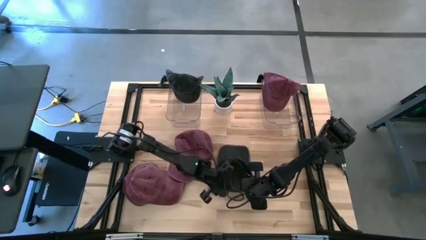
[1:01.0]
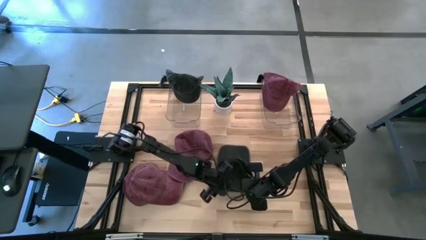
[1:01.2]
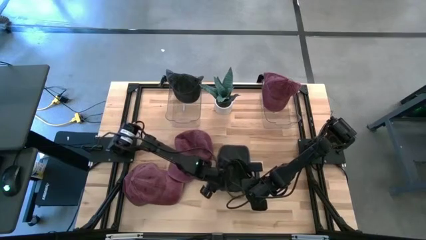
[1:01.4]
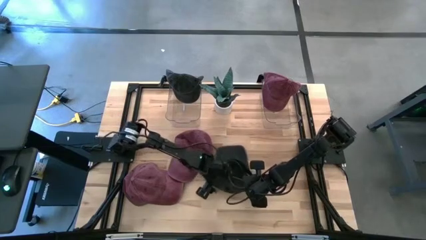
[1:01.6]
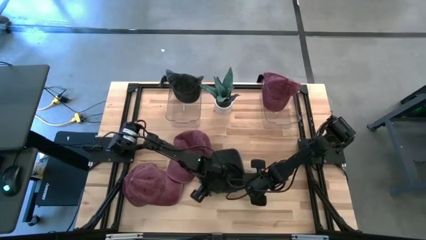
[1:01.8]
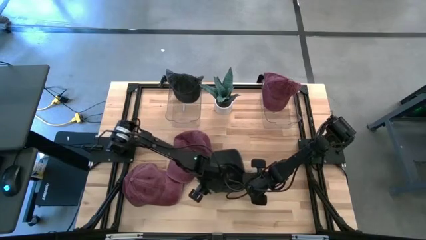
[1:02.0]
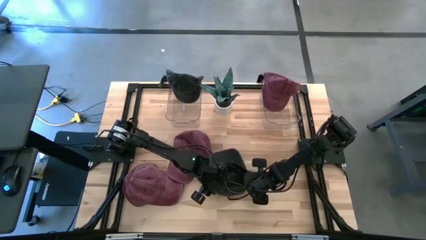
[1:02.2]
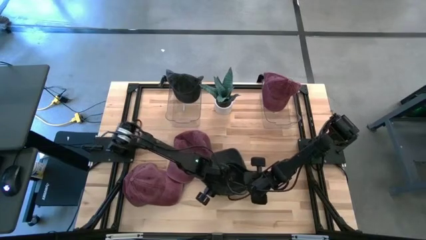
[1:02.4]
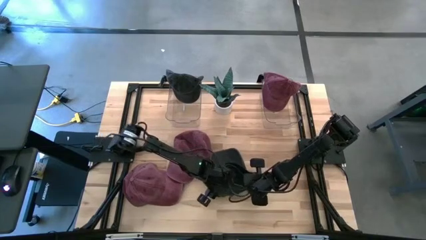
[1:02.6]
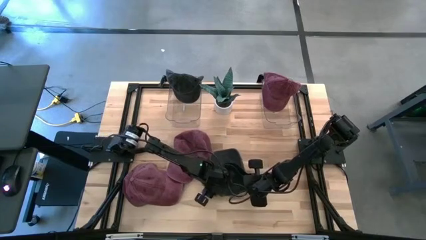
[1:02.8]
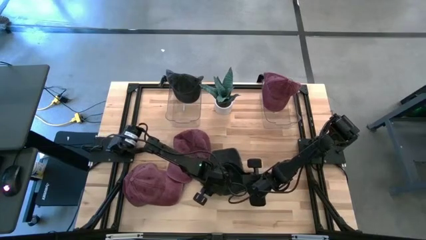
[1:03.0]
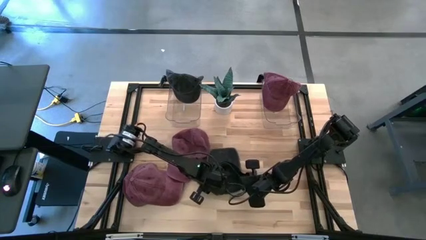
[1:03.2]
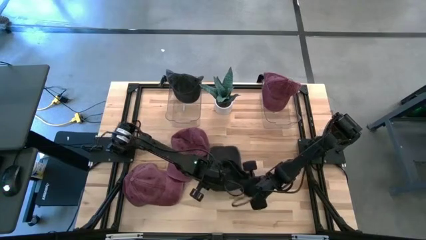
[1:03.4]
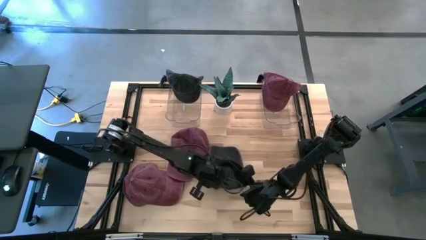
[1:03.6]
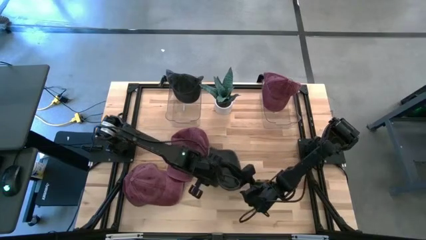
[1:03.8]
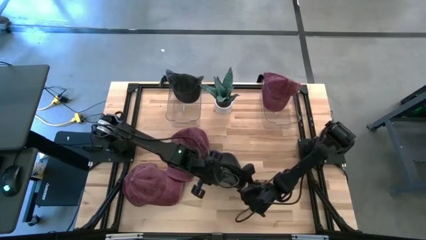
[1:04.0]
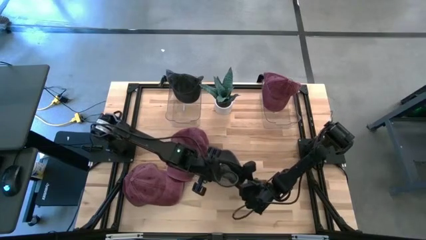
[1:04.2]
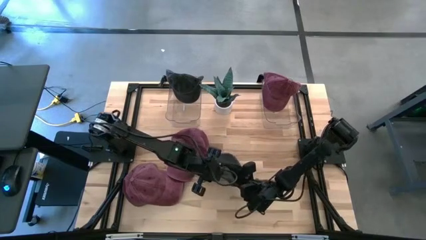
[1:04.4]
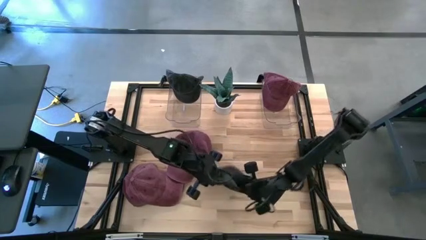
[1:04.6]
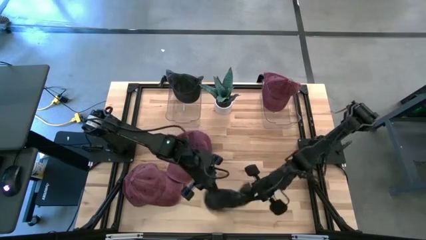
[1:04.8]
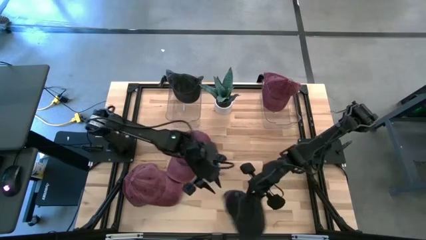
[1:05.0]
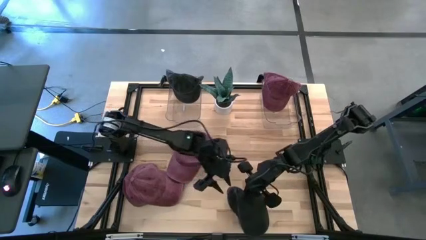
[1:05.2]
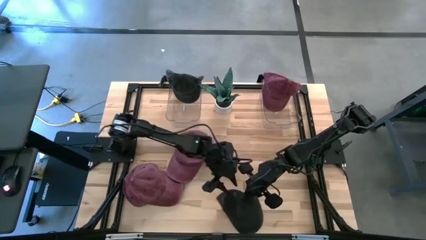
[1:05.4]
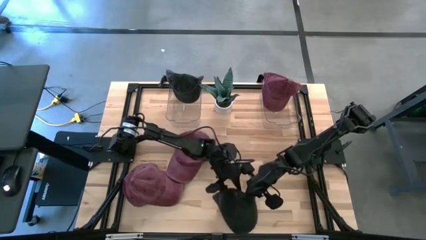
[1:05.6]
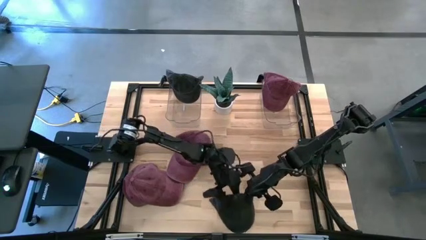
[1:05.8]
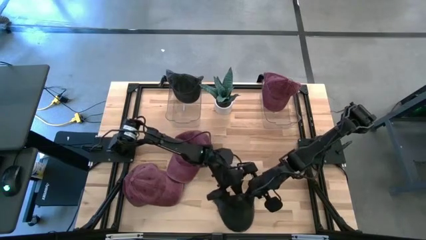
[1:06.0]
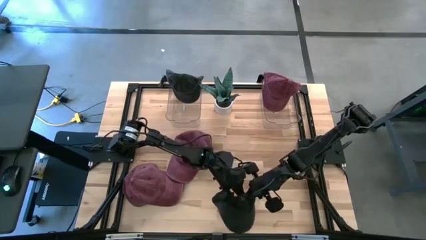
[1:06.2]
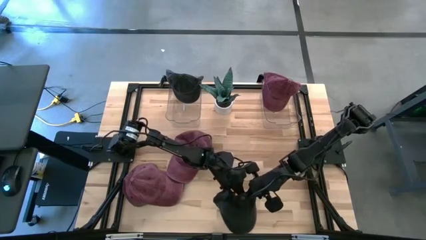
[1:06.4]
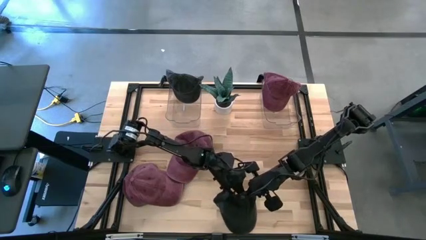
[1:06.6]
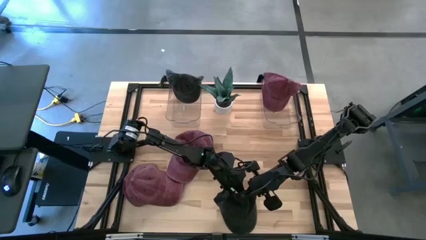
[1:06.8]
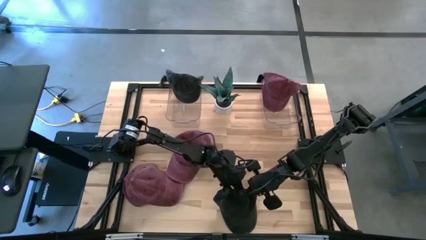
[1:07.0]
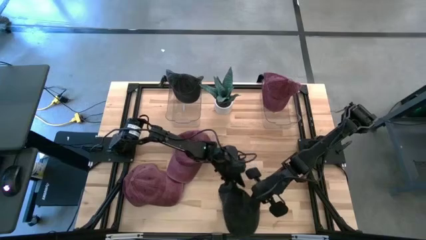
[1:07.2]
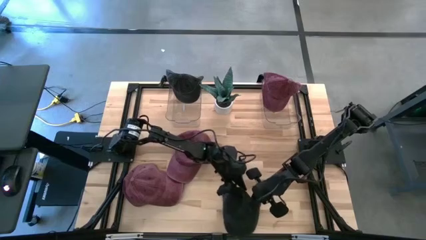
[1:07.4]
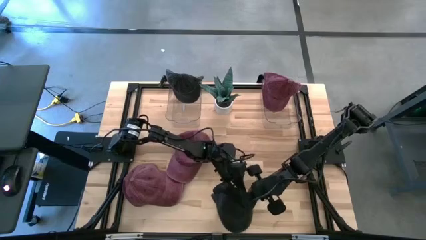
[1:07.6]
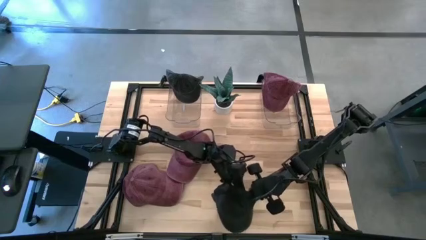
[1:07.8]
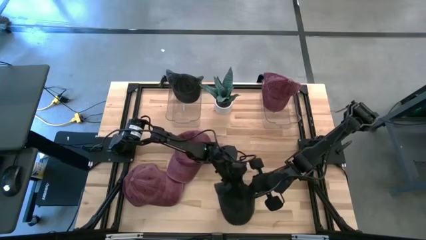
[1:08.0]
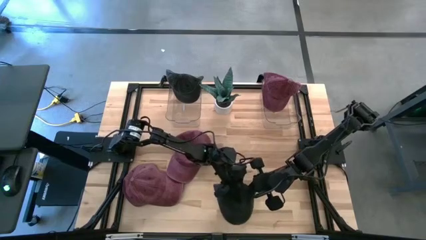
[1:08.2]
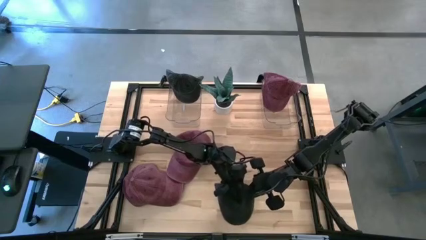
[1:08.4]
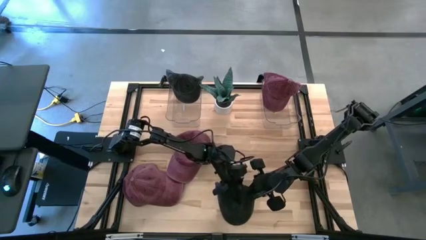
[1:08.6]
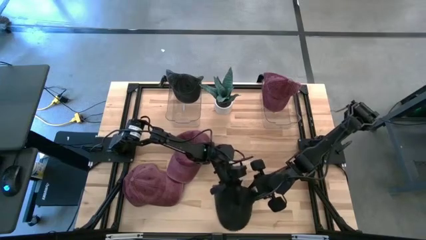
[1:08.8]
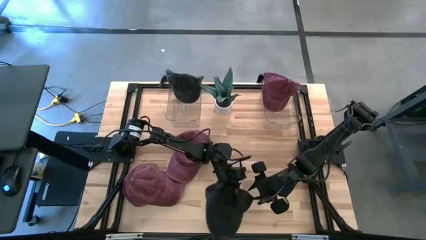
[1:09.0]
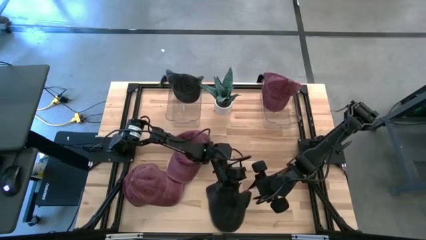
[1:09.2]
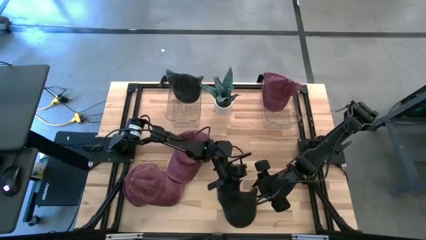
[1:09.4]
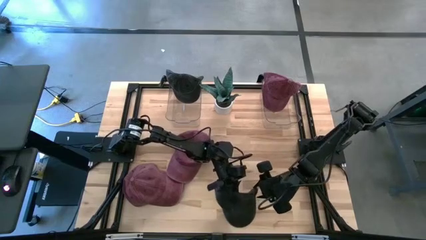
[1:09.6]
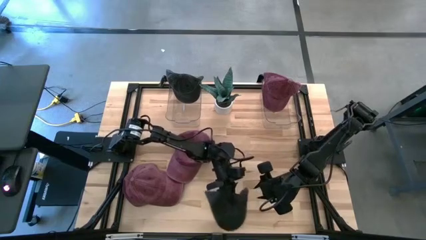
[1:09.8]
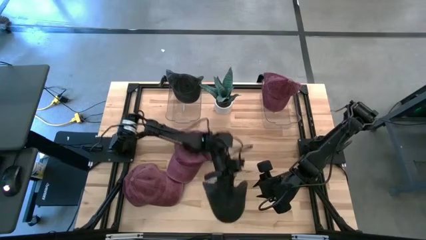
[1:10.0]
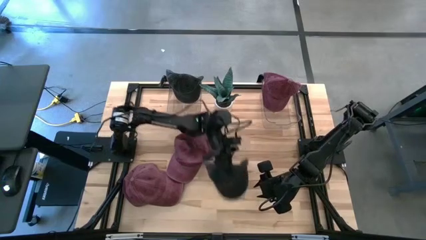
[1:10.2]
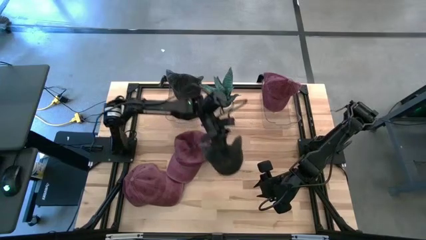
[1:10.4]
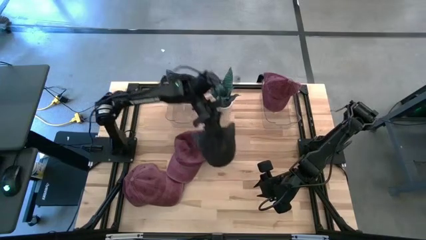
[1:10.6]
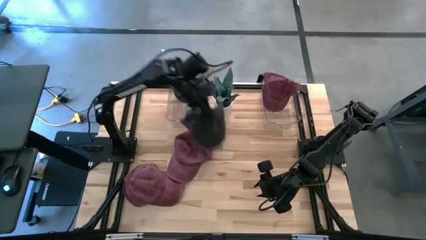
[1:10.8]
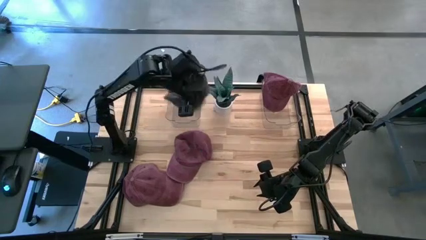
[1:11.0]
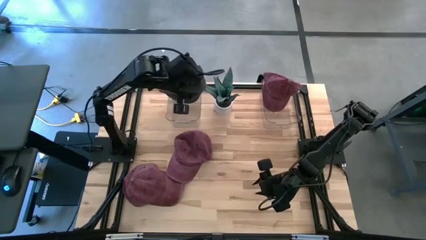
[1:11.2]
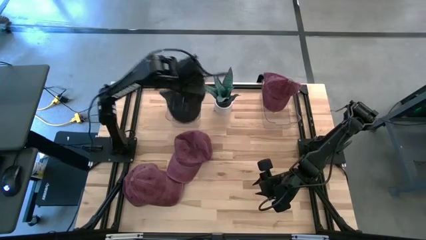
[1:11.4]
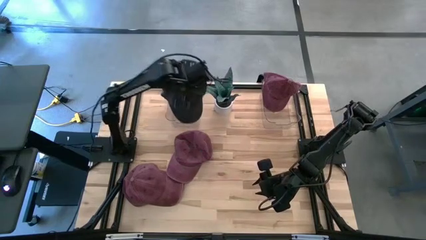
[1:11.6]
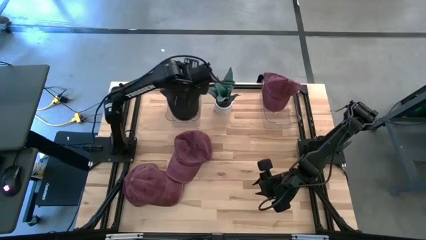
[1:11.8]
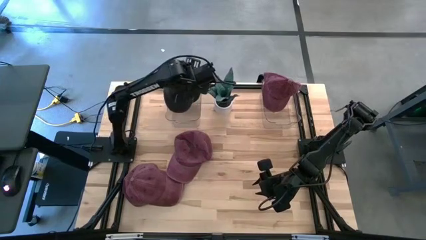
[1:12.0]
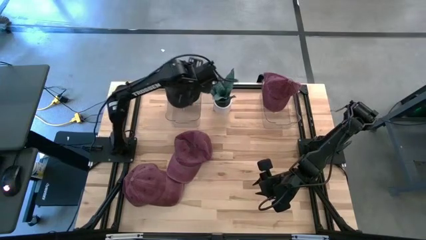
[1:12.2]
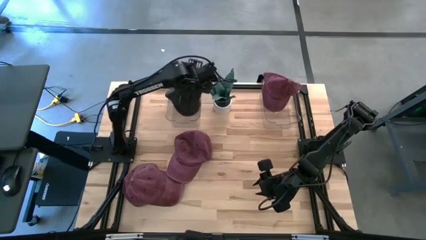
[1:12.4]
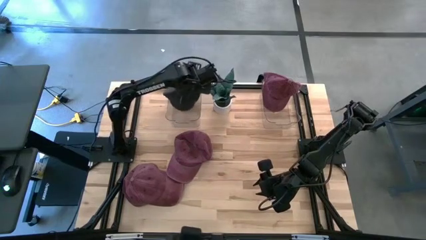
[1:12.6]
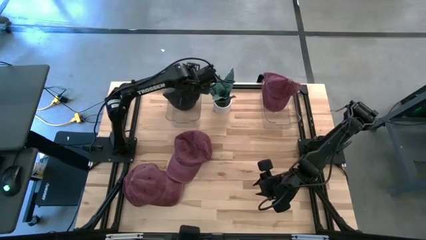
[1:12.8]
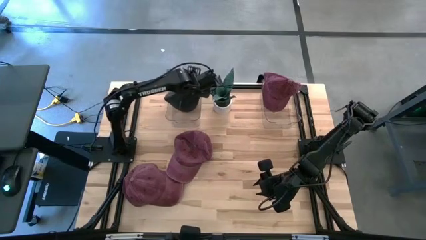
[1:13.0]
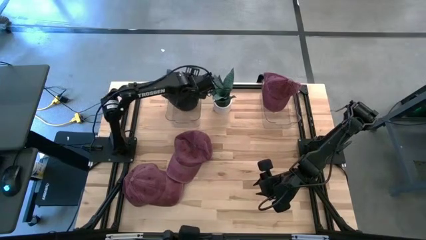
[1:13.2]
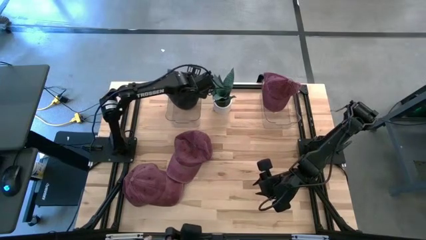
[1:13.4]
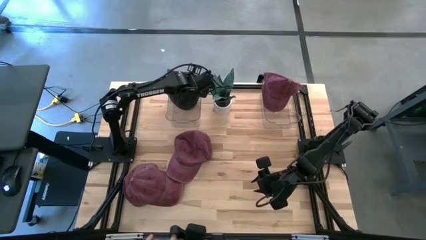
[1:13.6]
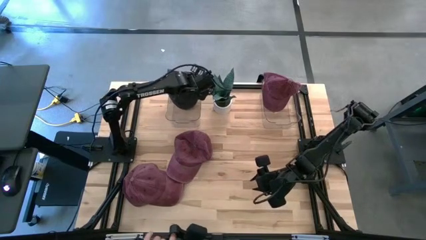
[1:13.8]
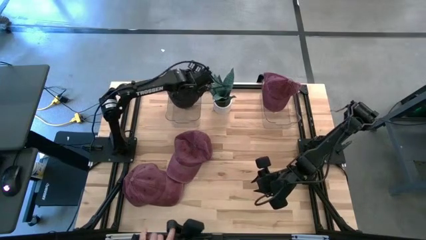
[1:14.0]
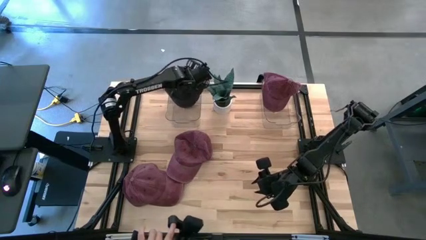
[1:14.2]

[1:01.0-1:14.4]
Task: Pick & Place hat
Put the black cap into the left transparent bin

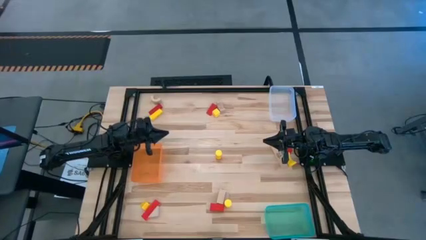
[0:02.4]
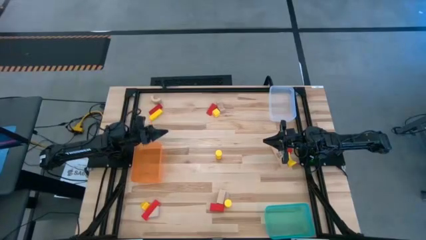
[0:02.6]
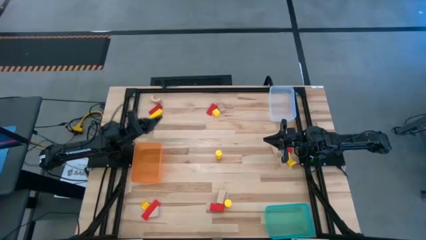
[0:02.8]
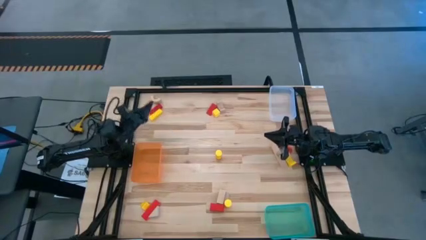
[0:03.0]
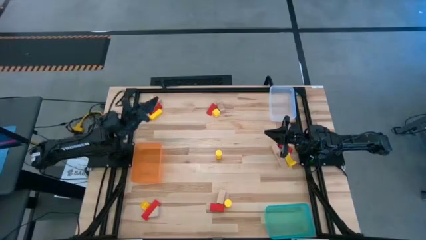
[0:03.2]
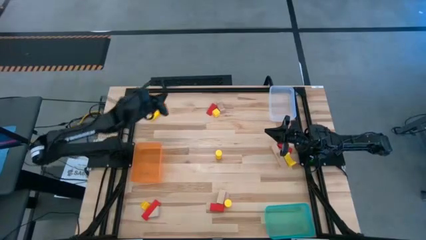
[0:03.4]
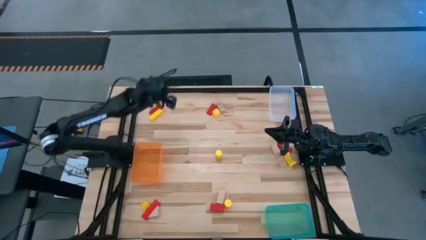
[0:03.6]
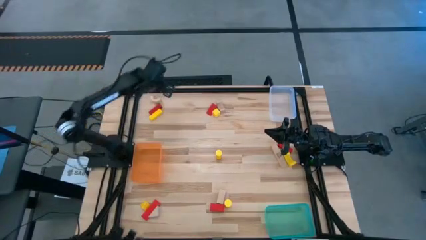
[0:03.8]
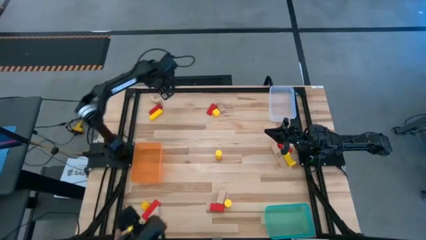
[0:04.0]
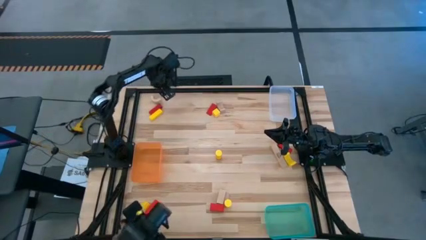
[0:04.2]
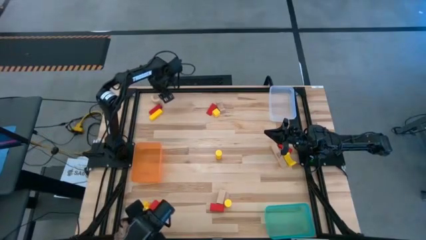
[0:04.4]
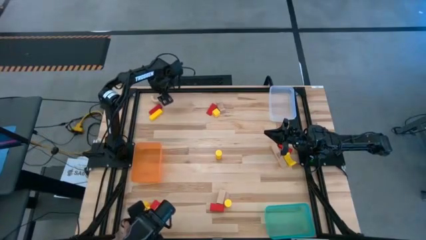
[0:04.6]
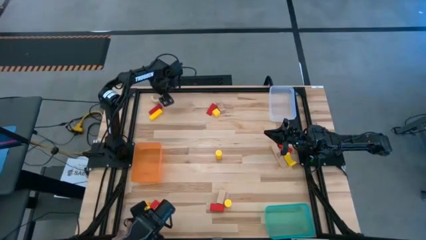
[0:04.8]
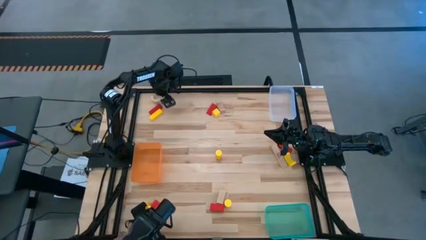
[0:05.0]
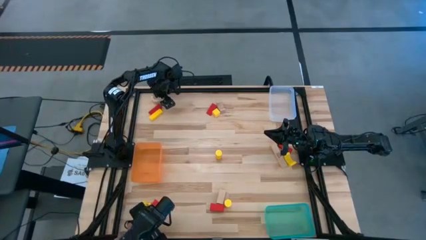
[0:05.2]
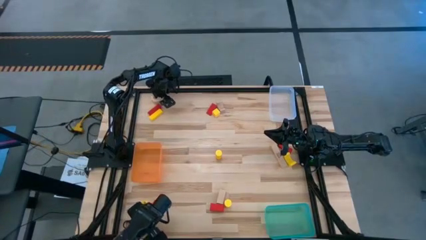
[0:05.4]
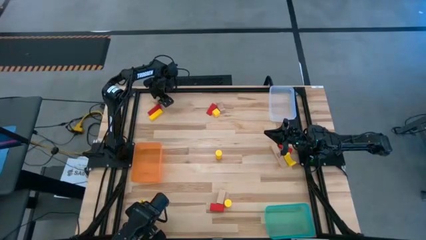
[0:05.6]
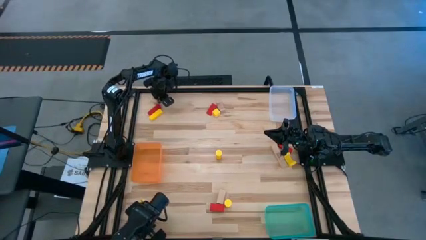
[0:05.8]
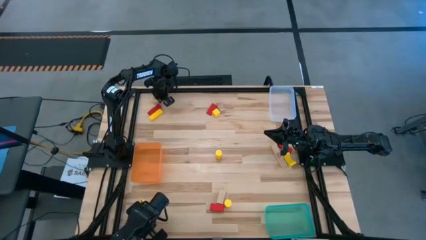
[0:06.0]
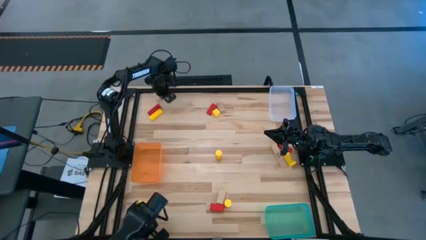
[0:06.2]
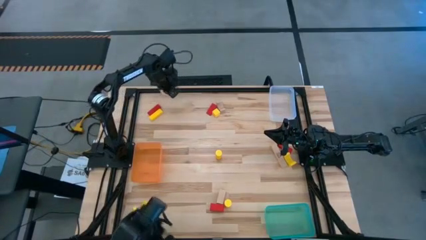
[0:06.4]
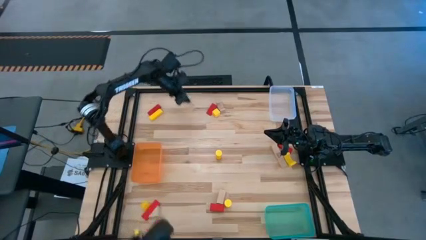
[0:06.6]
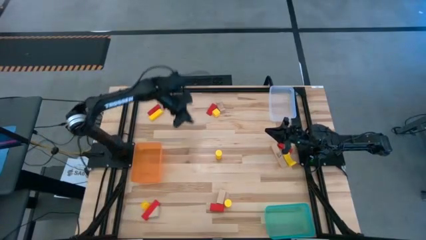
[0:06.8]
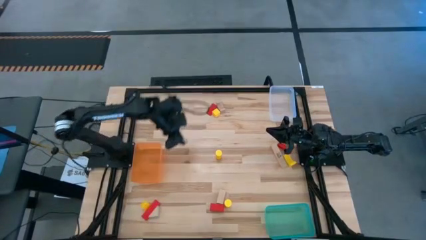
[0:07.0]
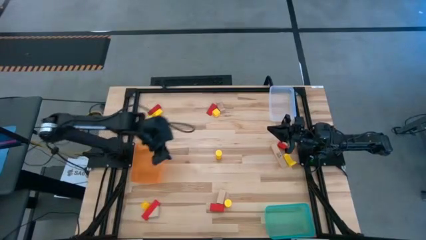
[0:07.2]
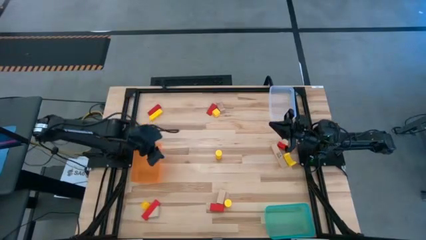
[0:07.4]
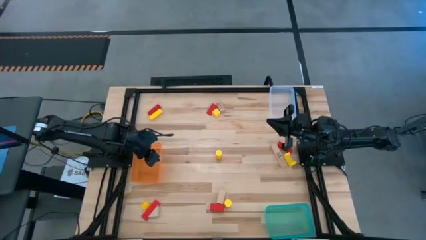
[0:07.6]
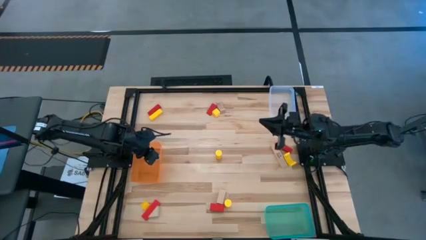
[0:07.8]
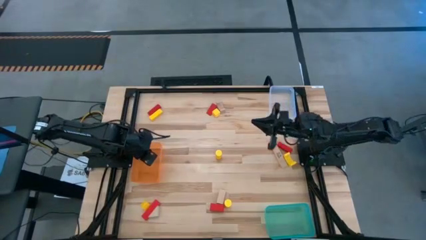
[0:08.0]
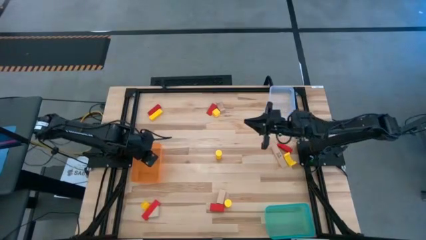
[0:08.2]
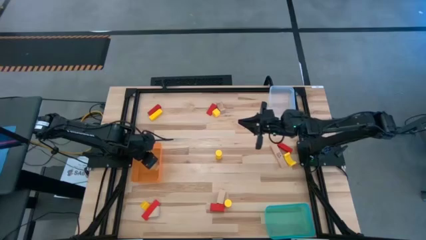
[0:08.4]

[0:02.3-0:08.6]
Task: Sort & place blocks by color
Put the brown block into the orange bin
